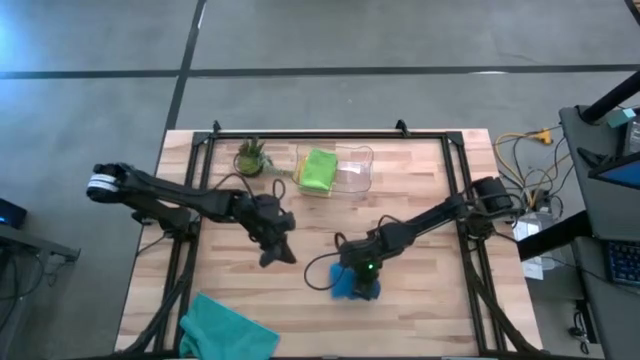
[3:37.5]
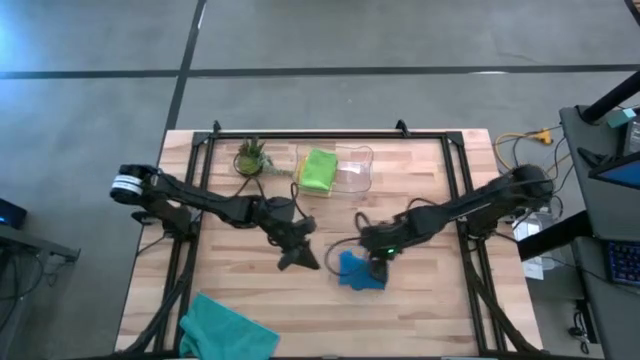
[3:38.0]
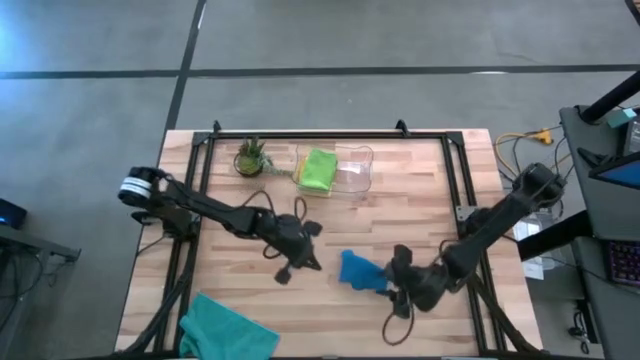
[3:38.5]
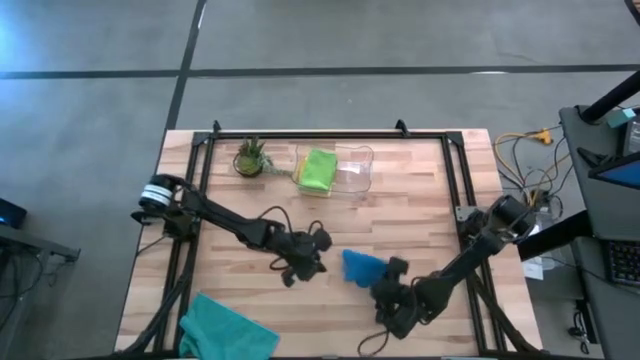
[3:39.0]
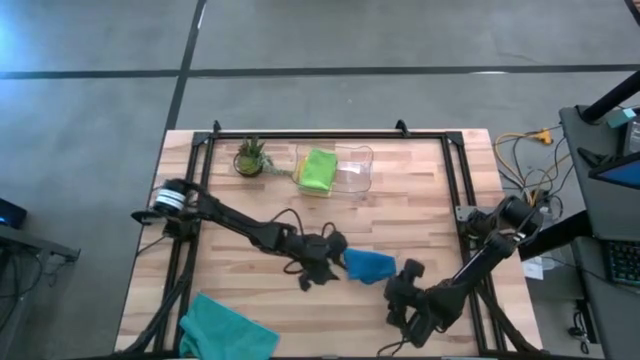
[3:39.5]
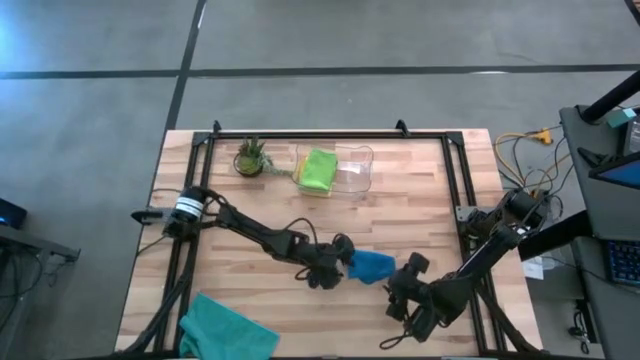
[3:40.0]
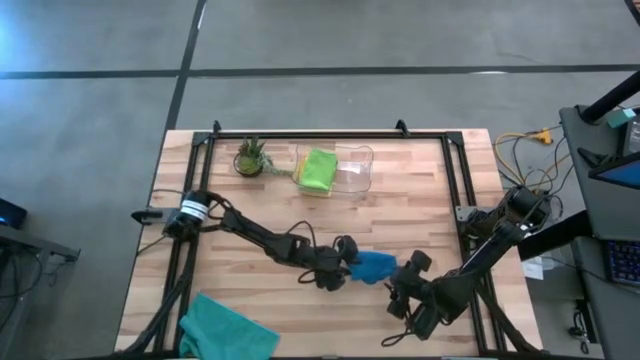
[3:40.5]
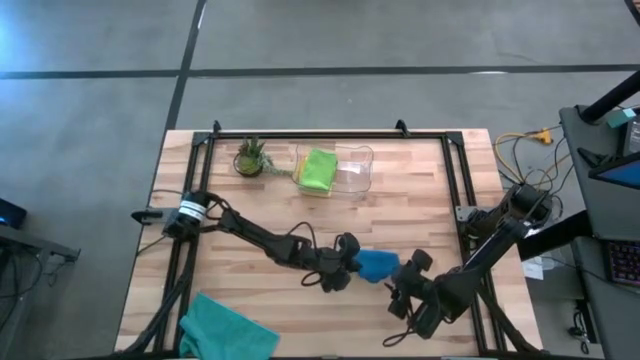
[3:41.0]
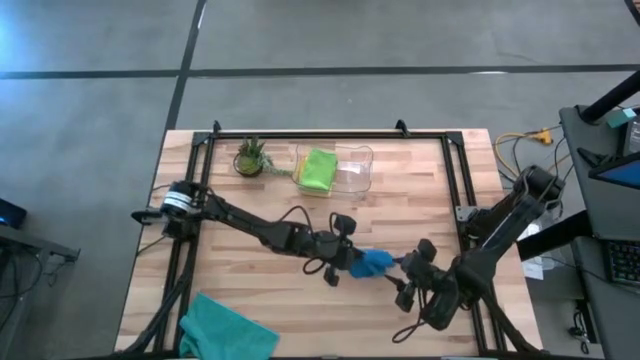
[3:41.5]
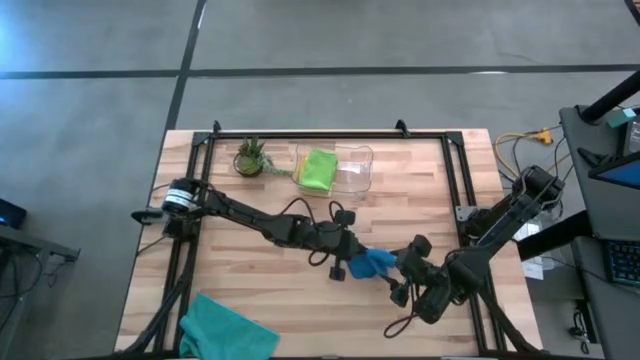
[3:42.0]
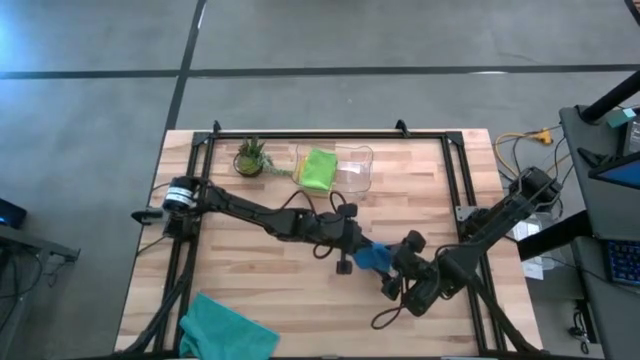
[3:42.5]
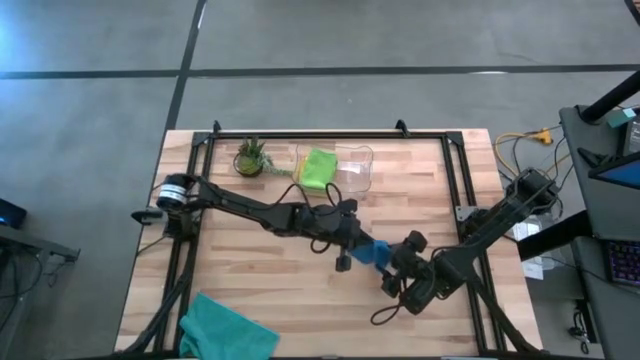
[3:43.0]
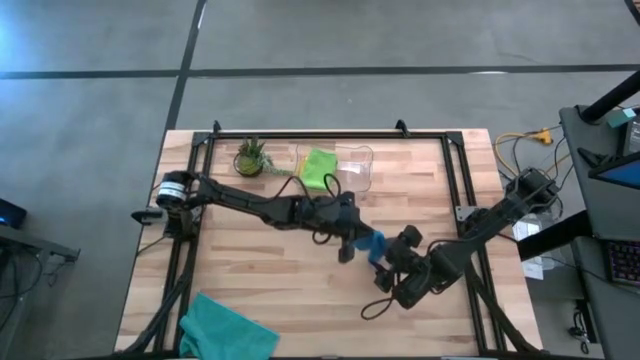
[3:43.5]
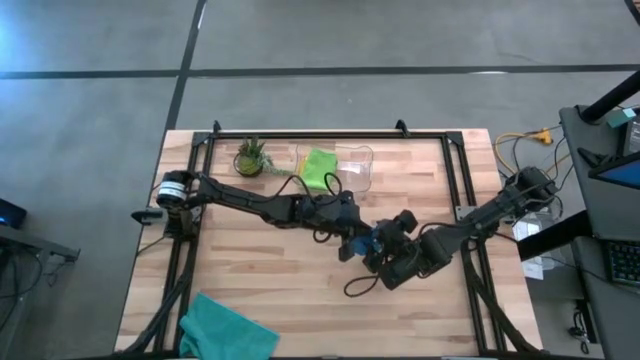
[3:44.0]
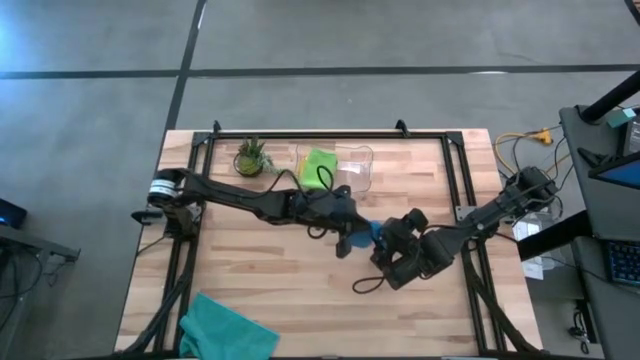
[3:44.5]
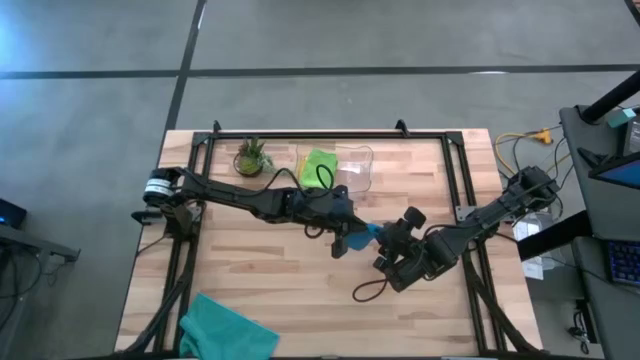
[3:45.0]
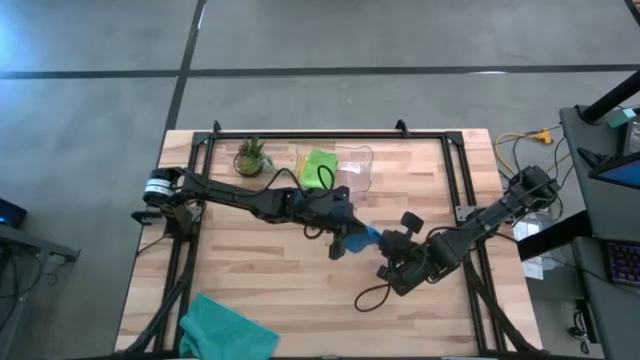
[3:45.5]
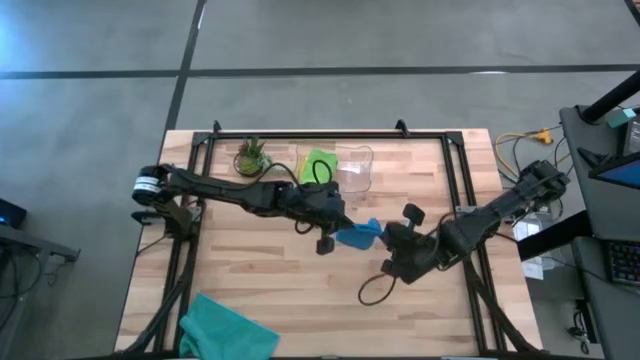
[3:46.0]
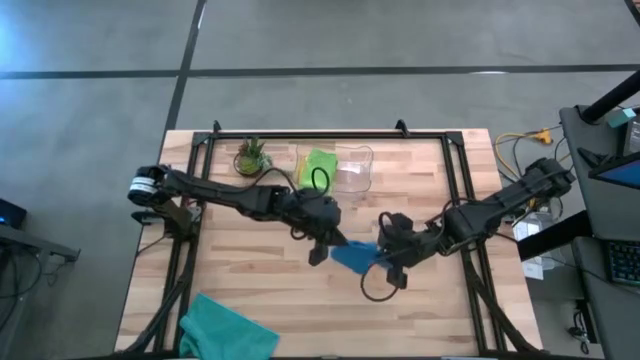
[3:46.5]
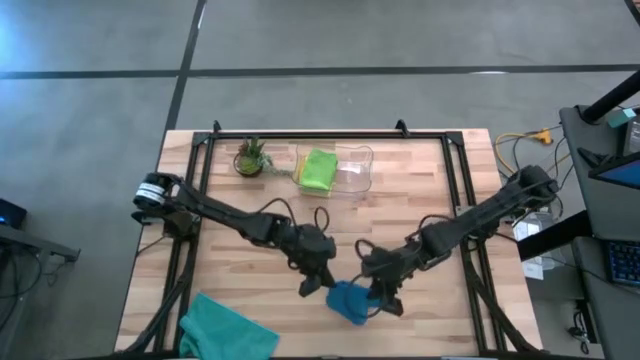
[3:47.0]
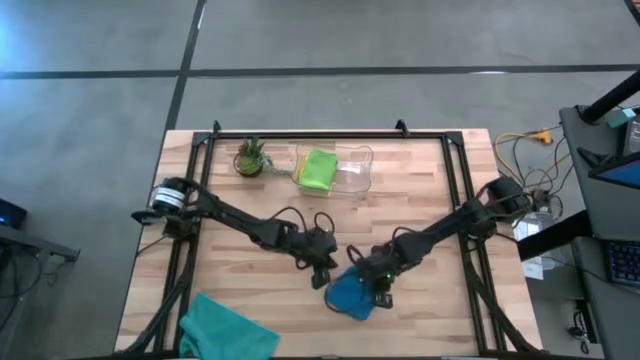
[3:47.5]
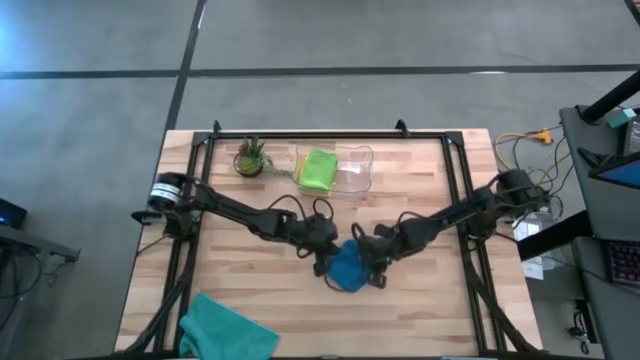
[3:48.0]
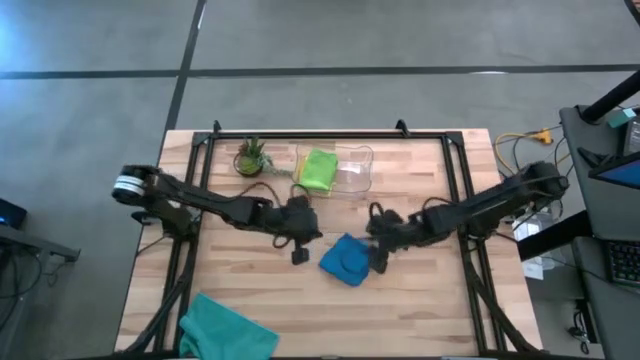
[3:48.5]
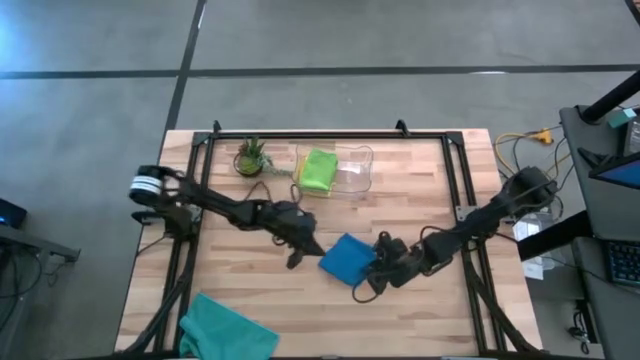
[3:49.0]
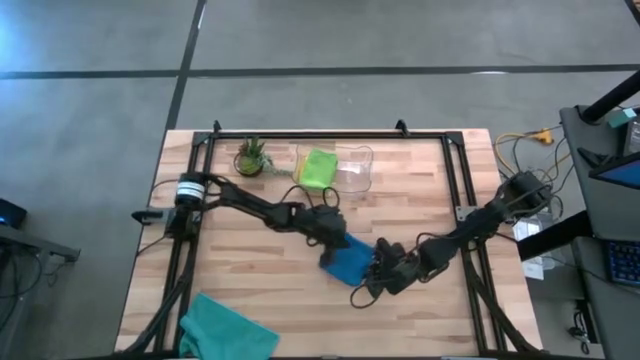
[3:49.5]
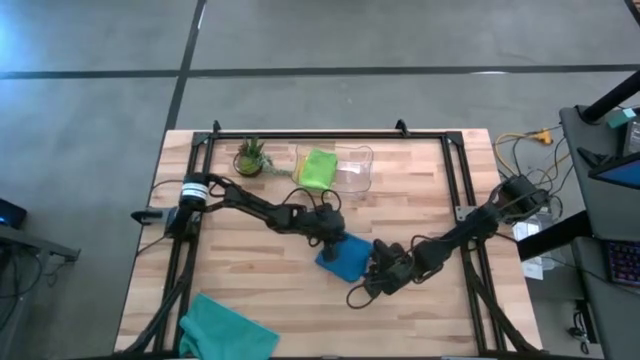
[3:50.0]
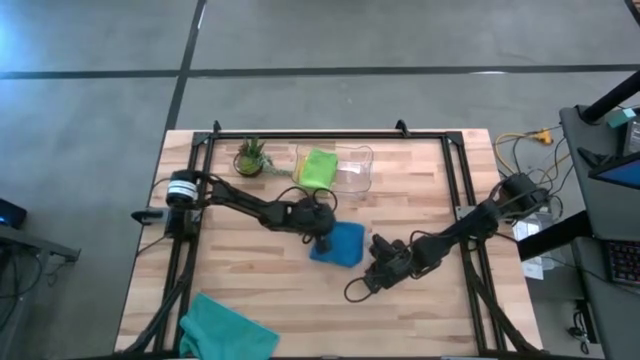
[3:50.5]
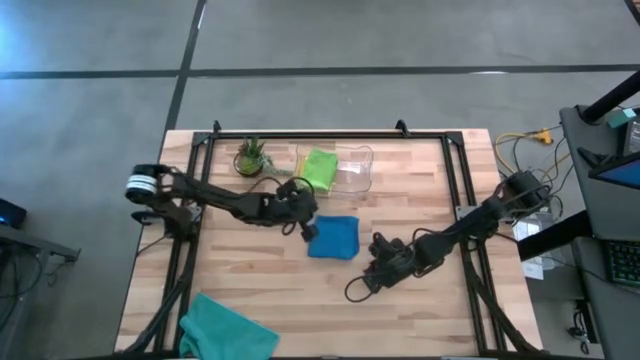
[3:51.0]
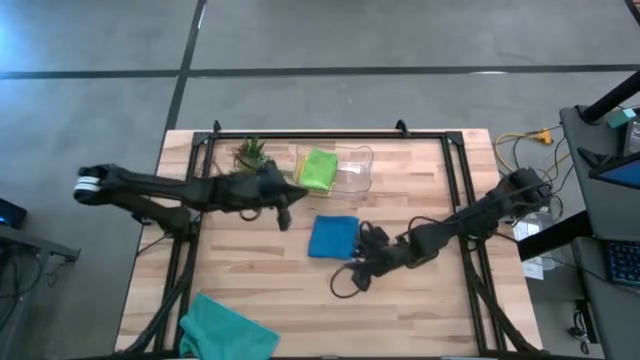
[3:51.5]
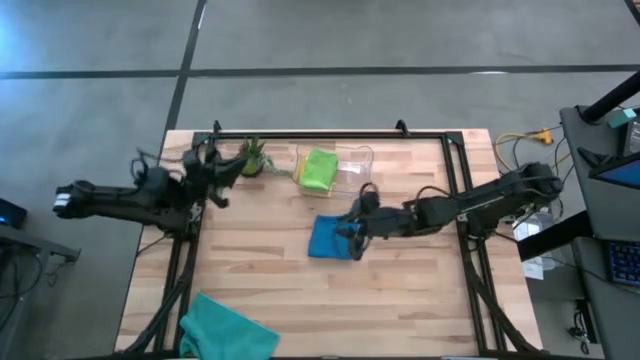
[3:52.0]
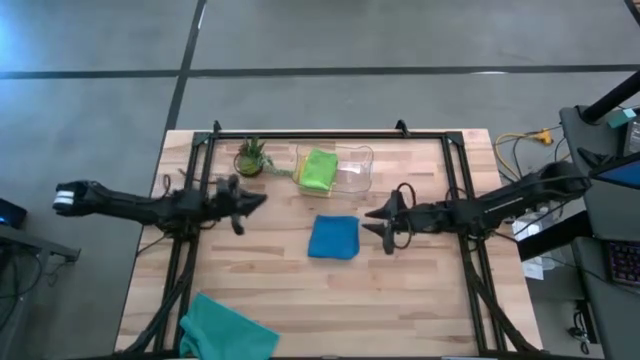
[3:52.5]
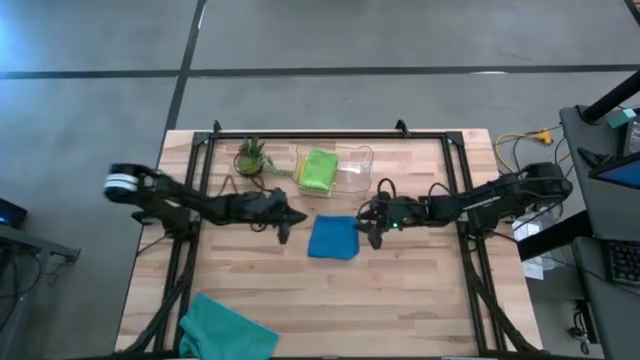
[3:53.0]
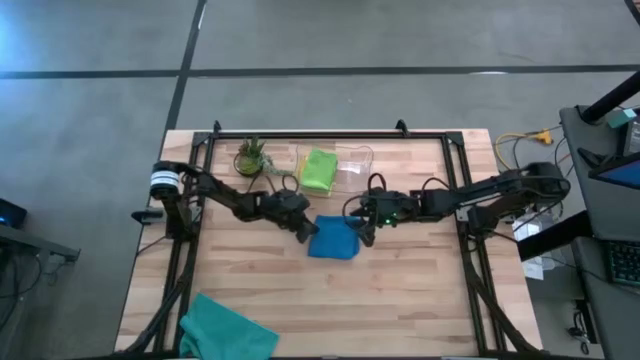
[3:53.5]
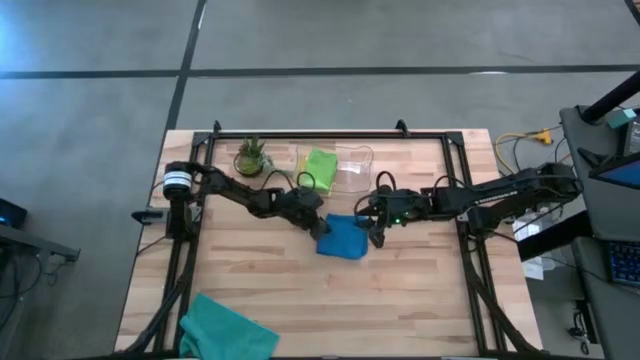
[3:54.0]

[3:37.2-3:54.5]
Task: Fold microfiber towels
Fold the blue microfiber towel

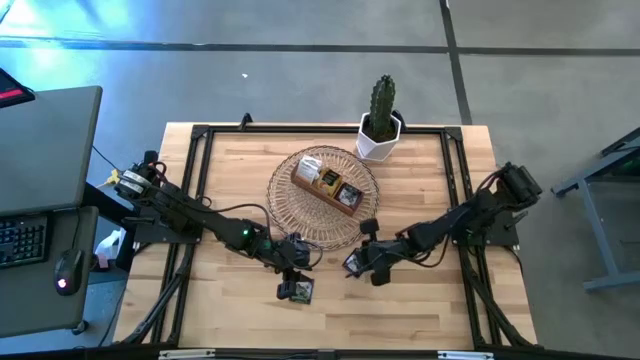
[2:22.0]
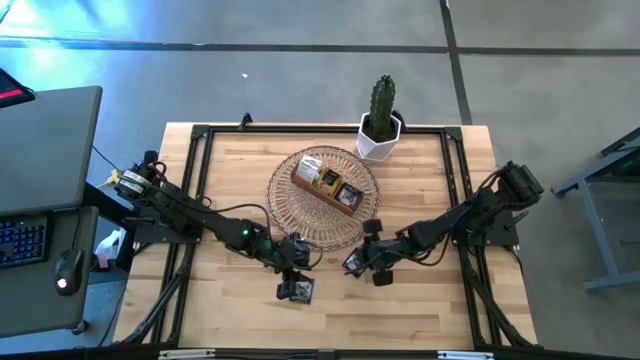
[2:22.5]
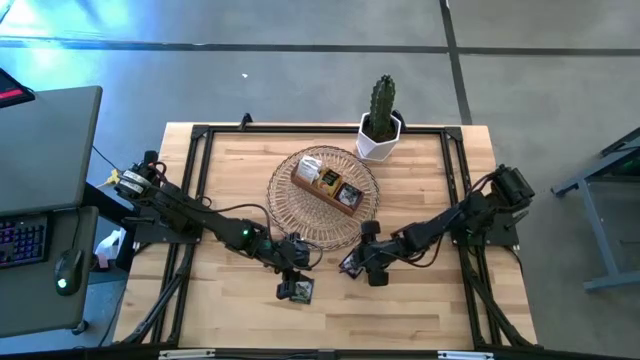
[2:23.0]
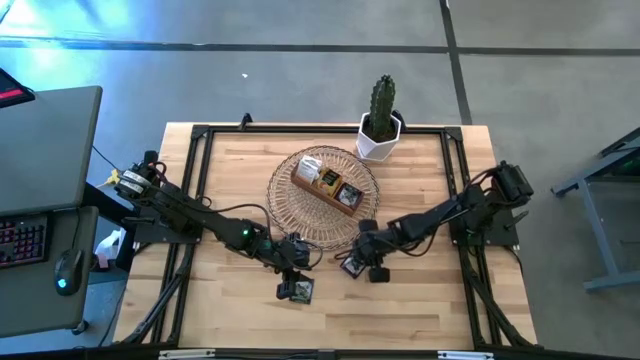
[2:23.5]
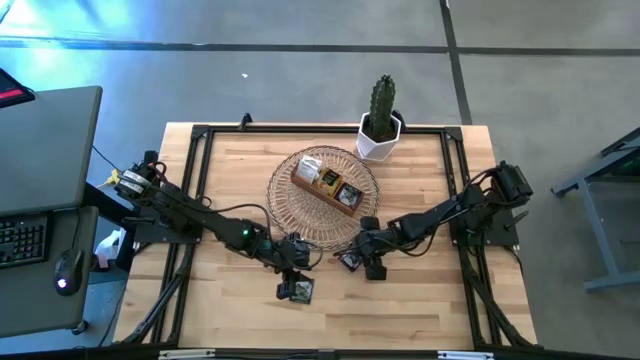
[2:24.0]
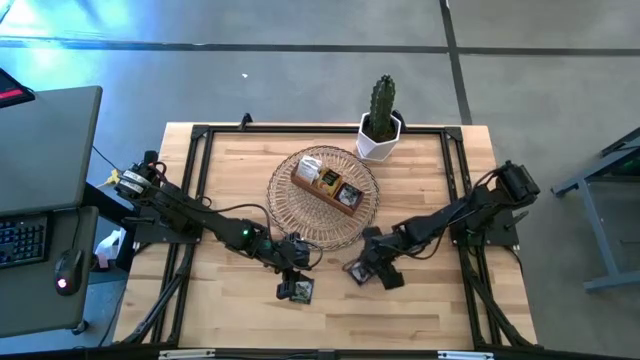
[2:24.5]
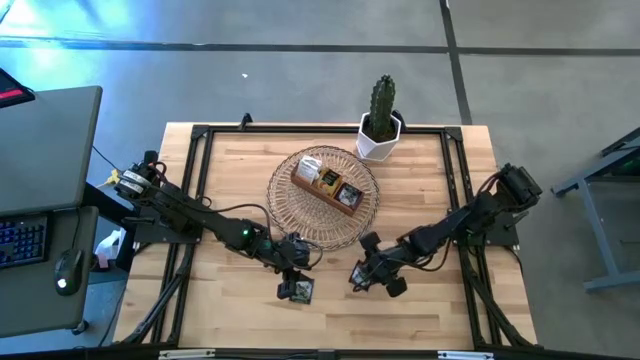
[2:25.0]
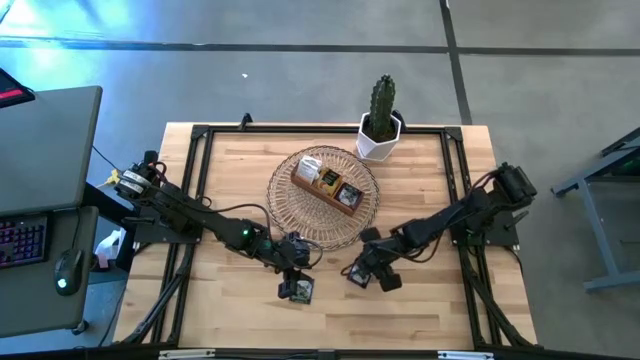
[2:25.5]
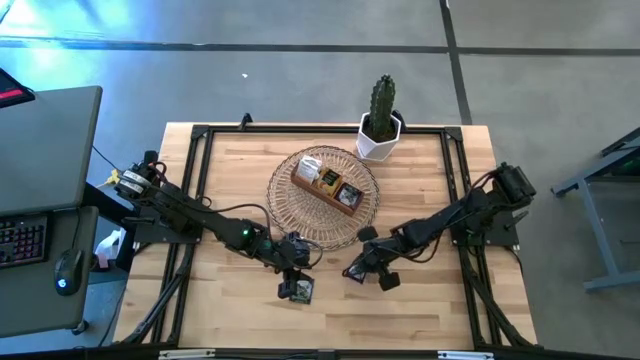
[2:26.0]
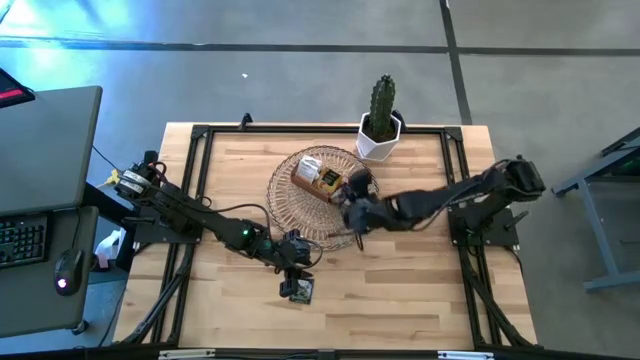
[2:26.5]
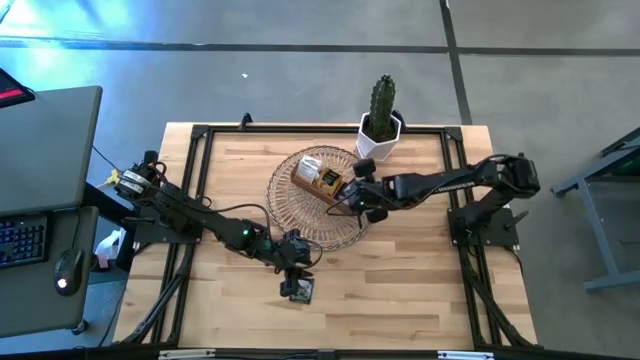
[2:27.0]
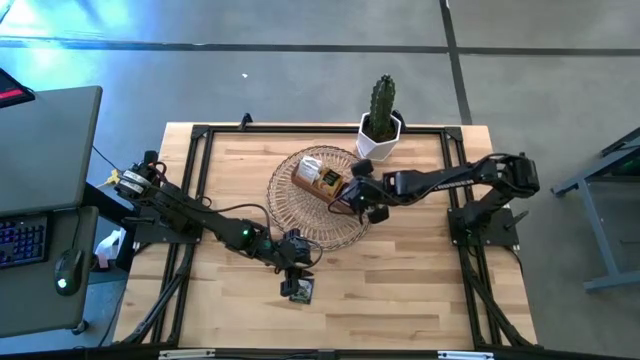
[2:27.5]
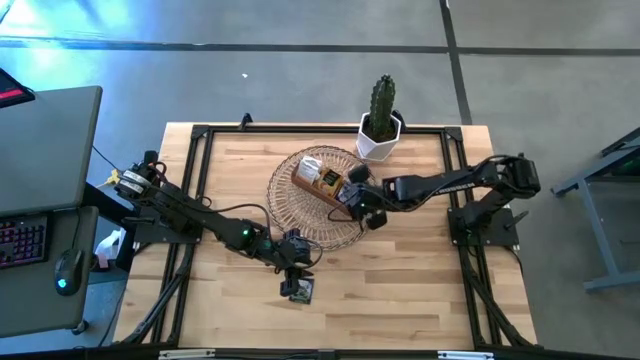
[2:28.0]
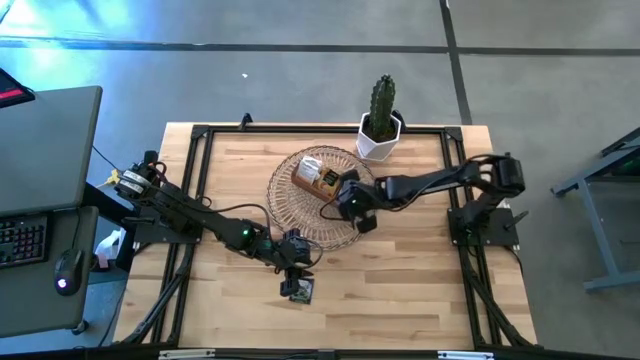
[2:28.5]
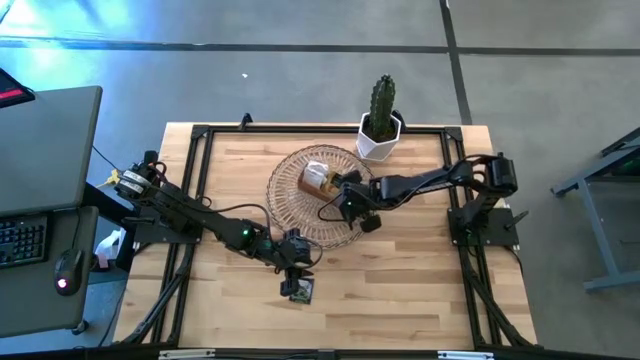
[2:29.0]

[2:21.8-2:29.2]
Task: Pick & Place Tea
Put the purple tea pack into the right section of the wooden organizer
